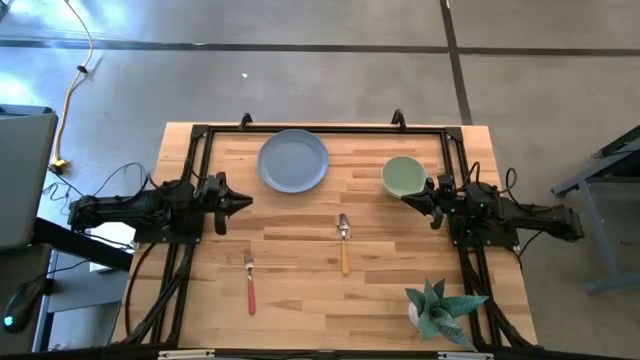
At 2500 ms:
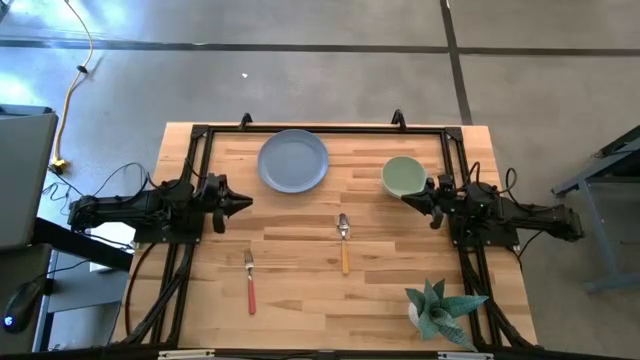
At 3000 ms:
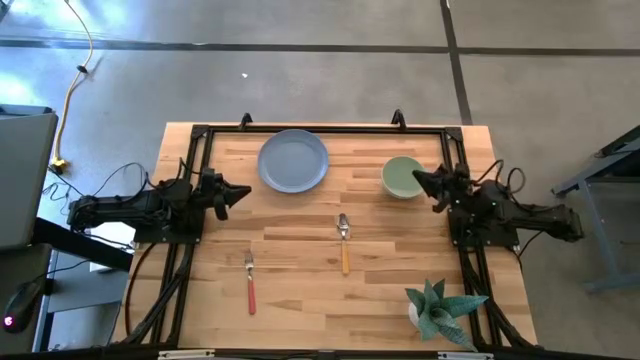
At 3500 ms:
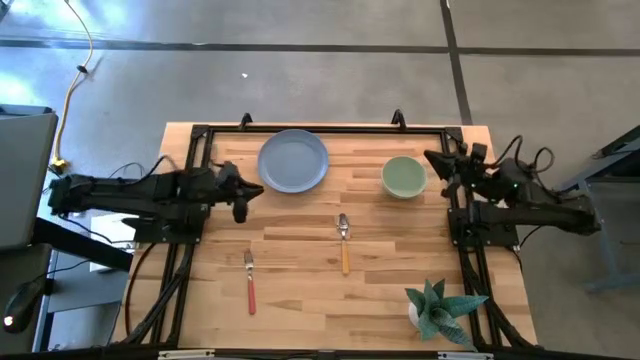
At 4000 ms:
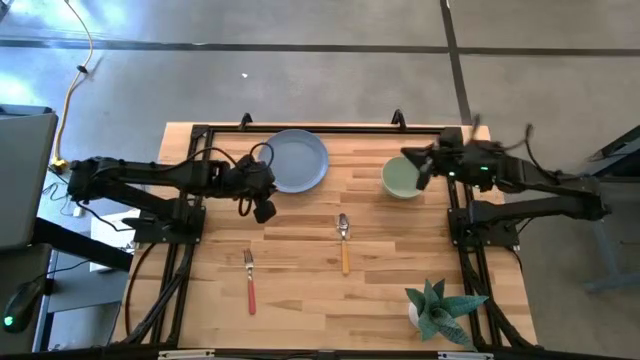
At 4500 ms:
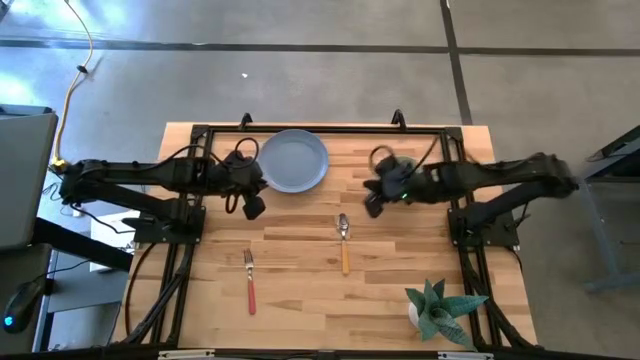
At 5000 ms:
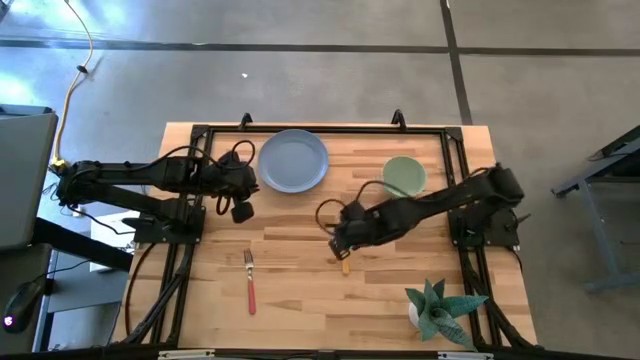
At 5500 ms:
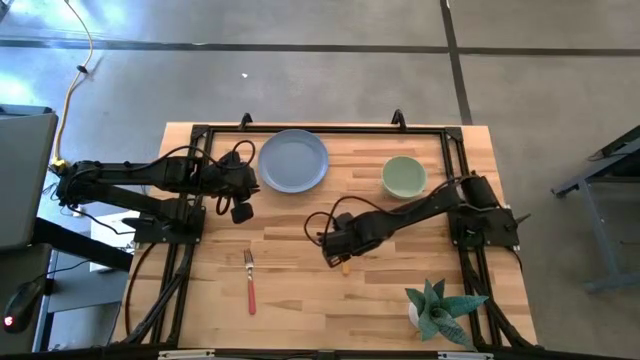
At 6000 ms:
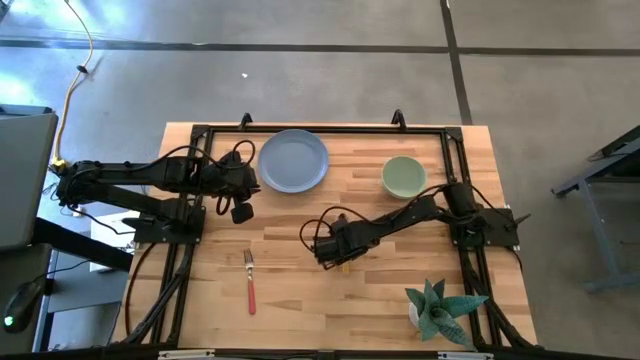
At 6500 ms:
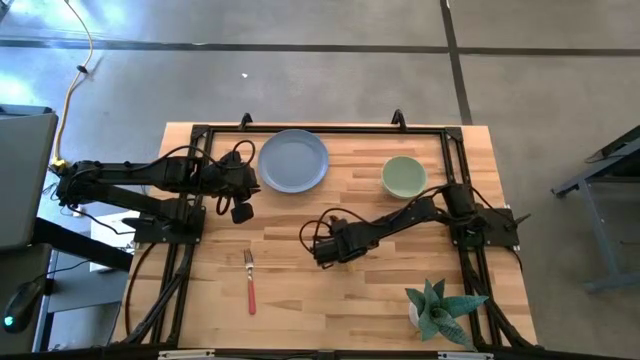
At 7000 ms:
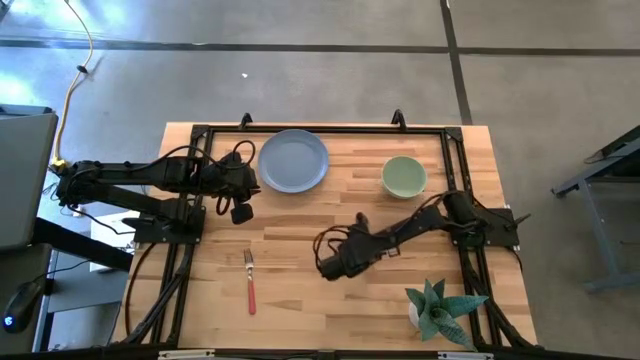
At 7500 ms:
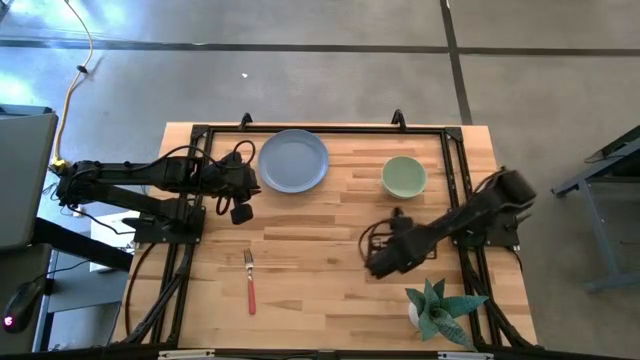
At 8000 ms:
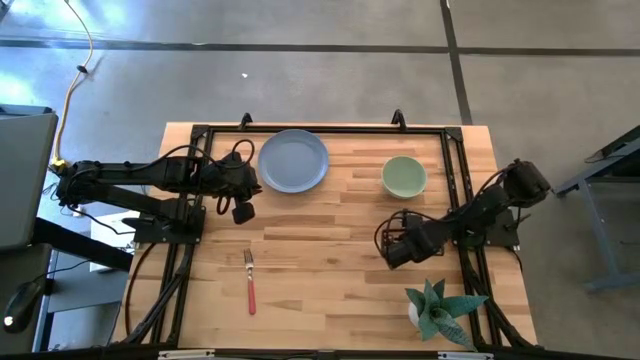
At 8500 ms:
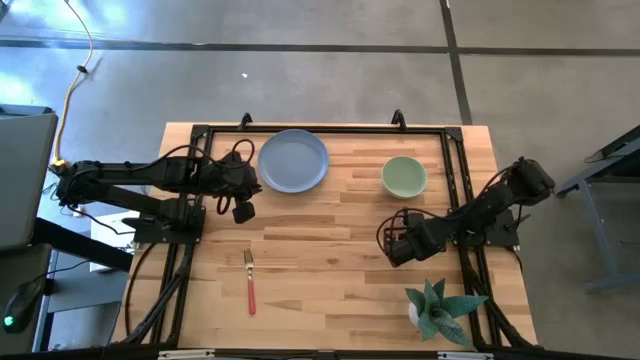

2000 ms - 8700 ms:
Task: Set table place
Adjust the yellow spoon

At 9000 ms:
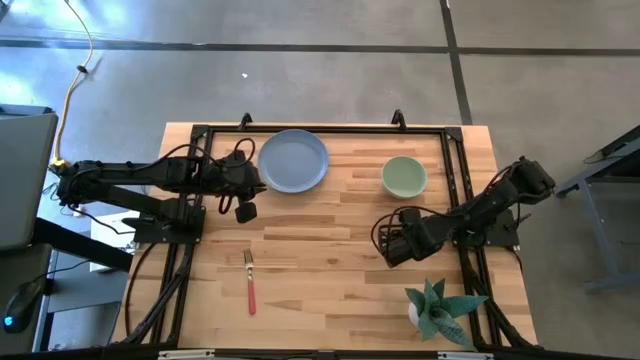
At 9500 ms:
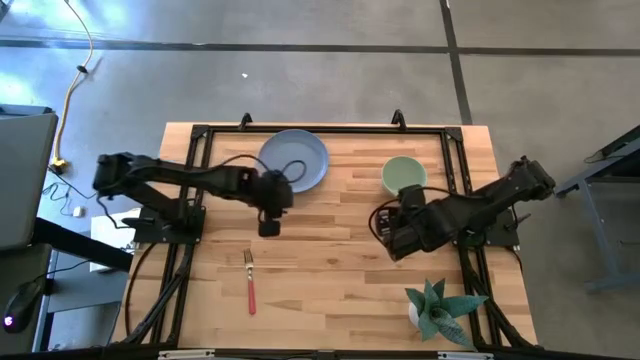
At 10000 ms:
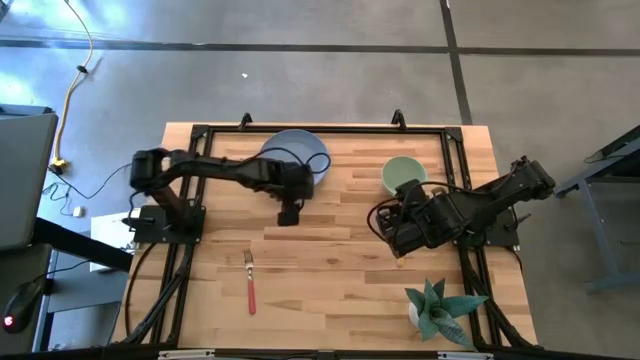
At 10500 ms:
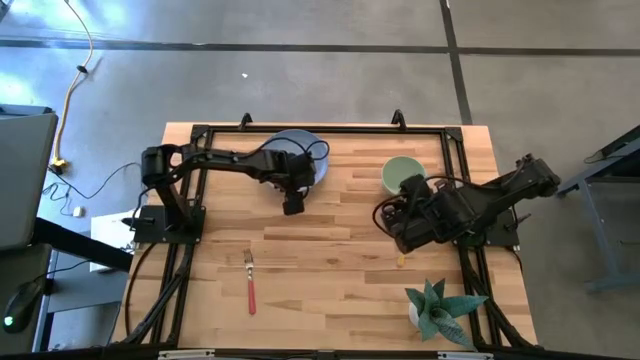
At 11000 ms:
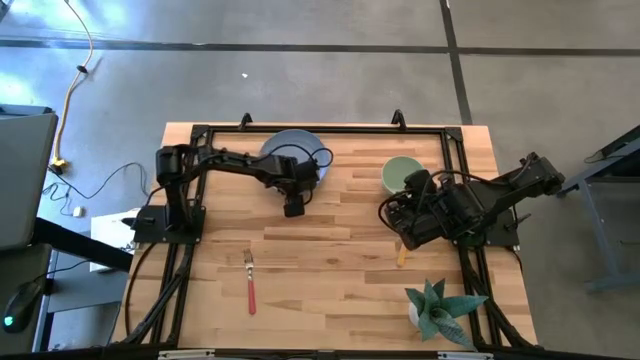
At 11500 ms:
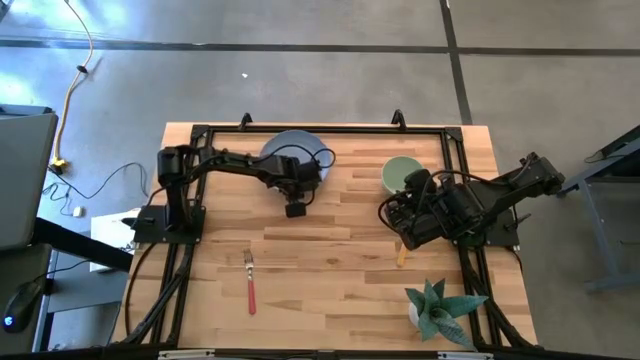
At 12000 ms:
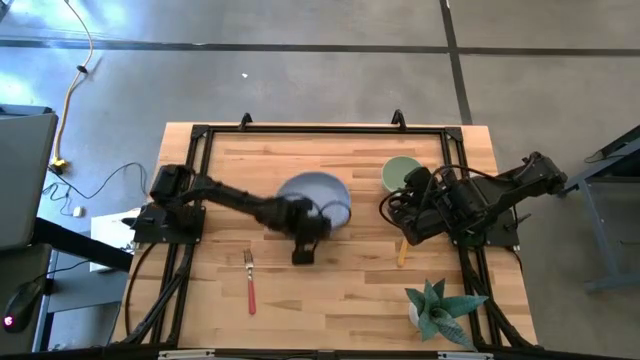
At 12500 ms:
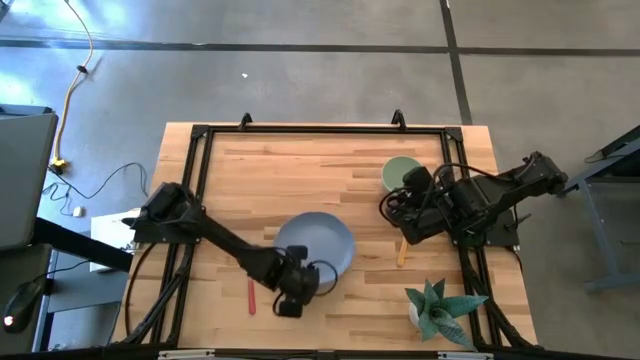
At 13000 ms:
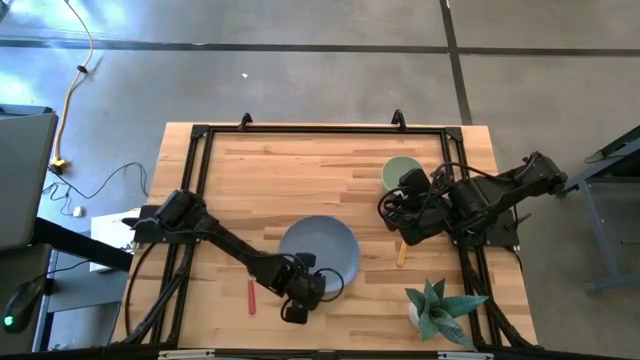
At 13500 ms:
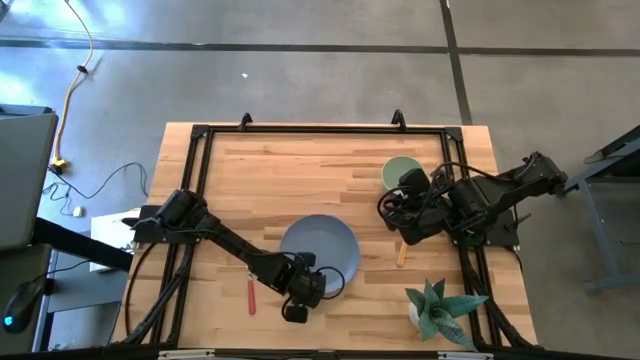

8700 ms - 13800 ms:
Adjust the blue plate

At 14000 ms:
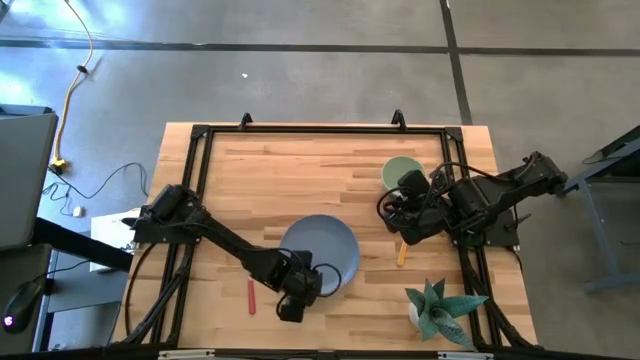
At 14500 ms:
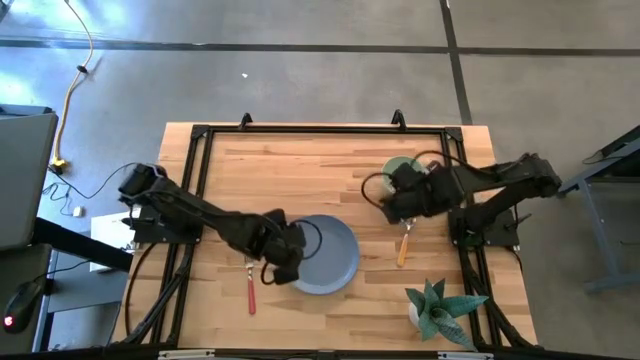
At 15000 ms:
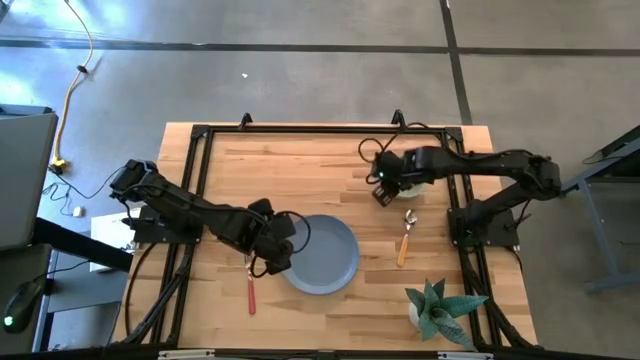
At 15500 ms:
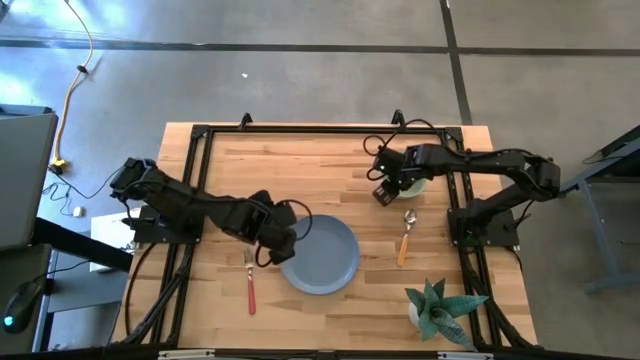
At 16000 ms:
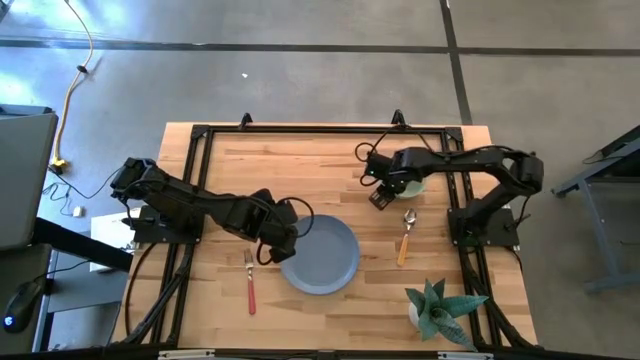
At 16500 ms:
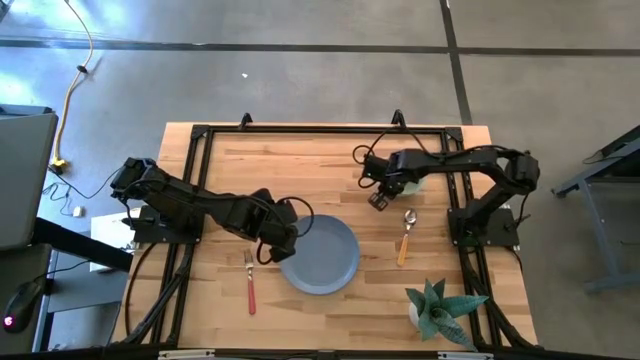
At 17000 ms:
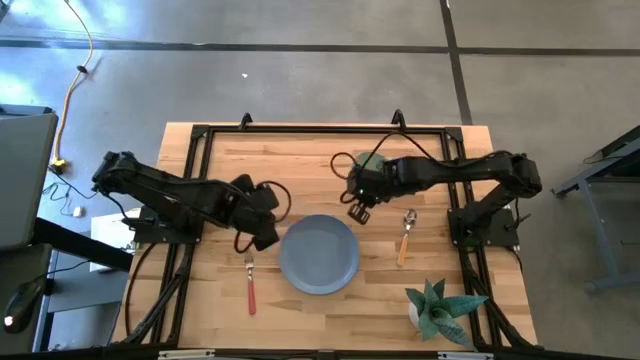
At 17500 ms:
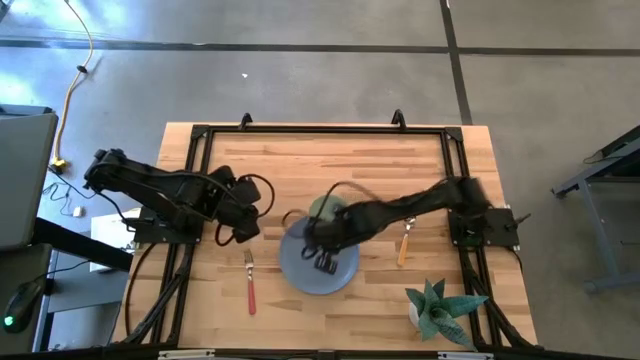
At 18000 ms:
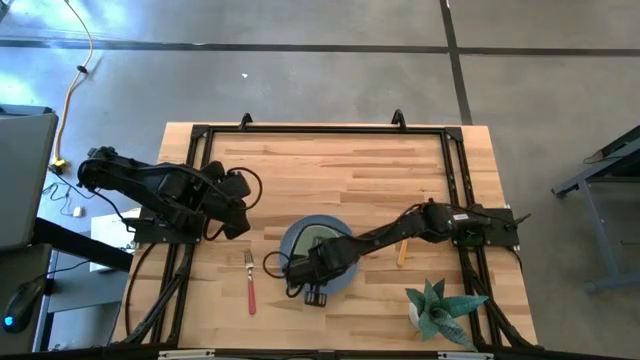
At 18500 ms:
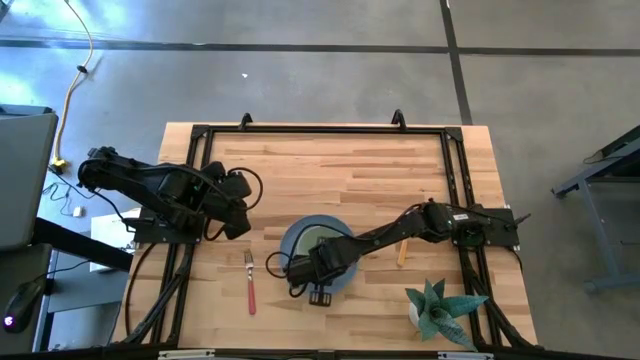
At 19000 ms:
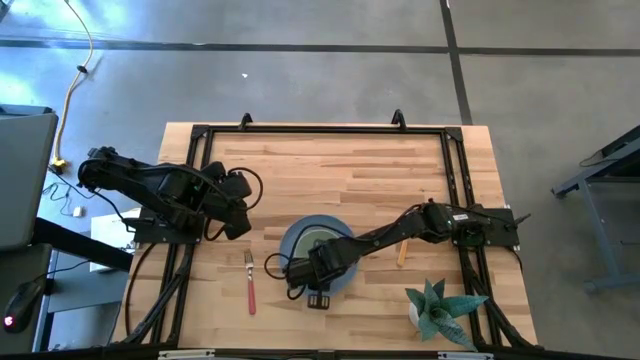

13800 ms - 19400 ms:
Put the green bowl on top of the blue plate

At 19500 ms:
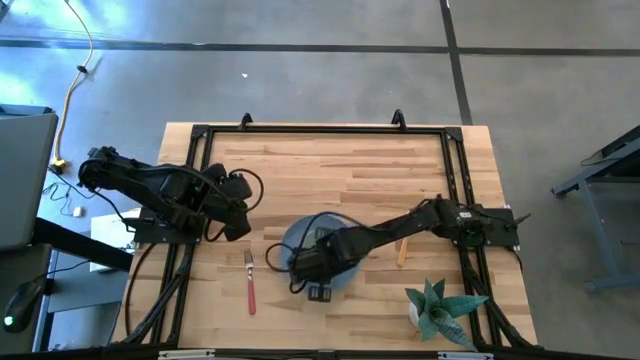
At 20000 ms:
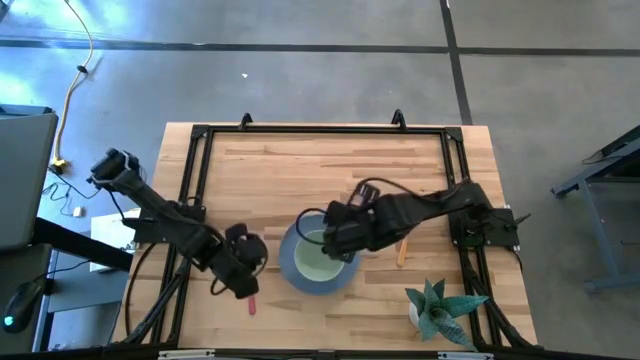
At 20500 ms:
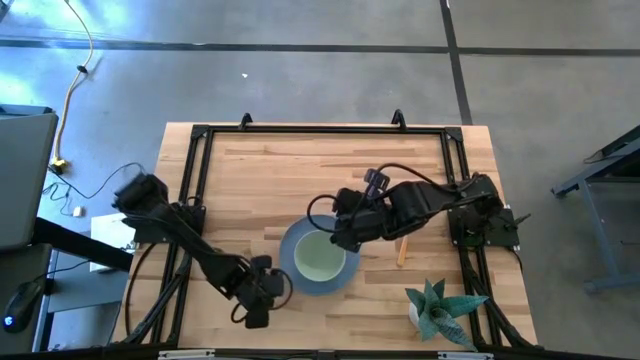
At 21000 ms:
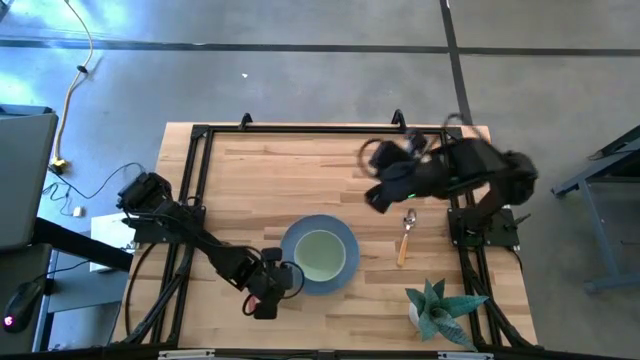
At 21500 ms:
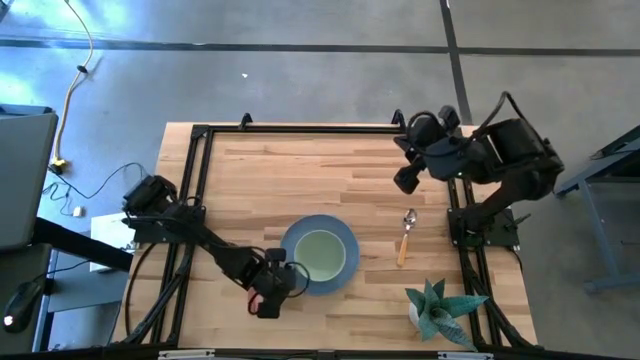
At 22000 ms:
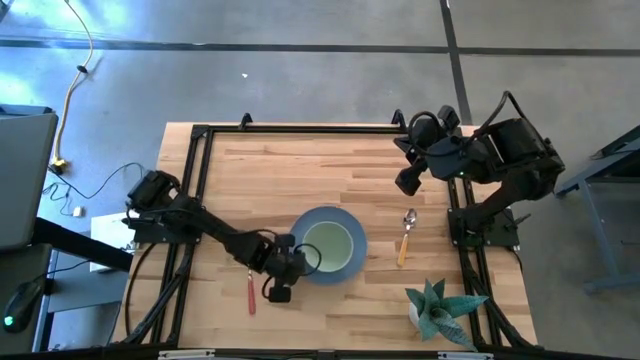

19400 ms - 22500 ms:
Adjust the blue plate
